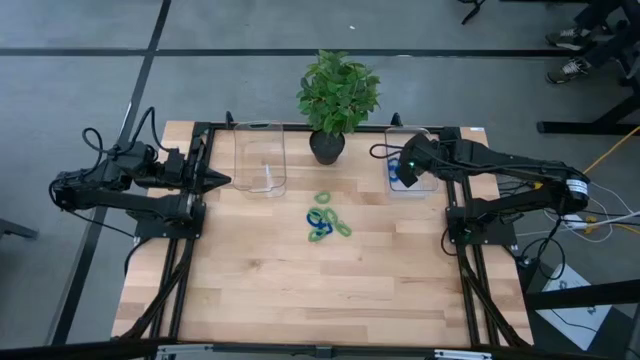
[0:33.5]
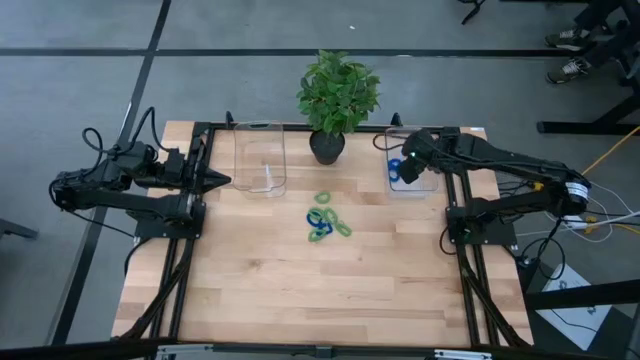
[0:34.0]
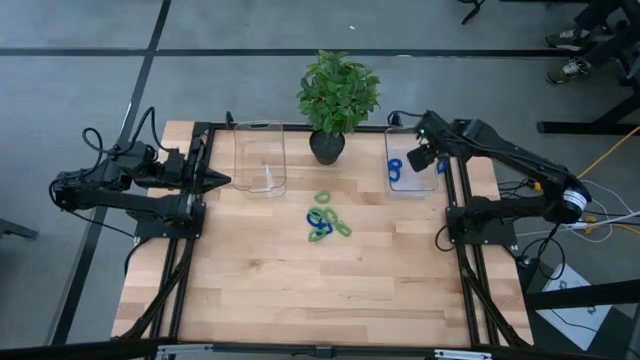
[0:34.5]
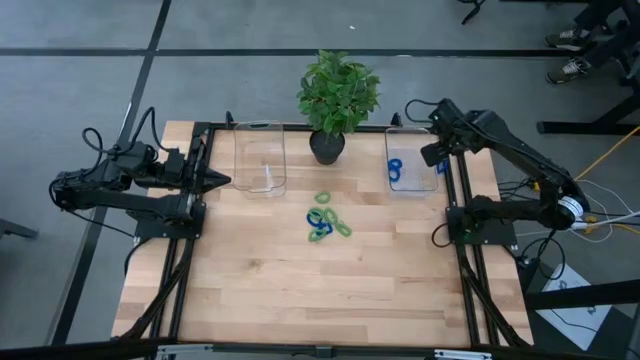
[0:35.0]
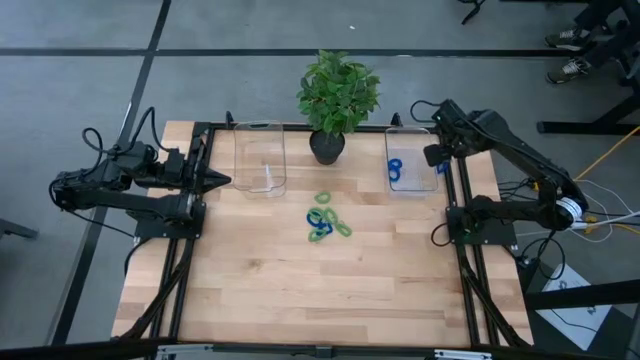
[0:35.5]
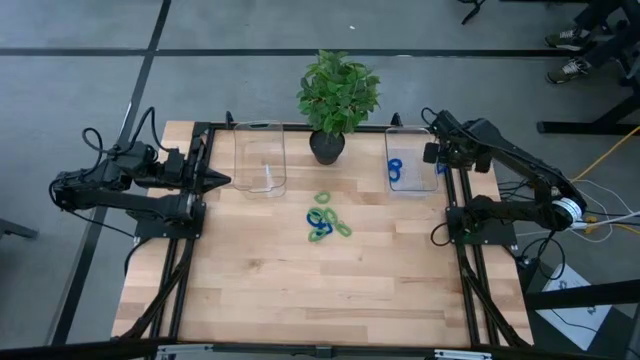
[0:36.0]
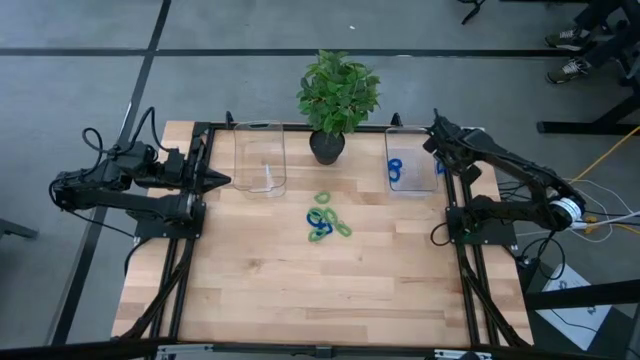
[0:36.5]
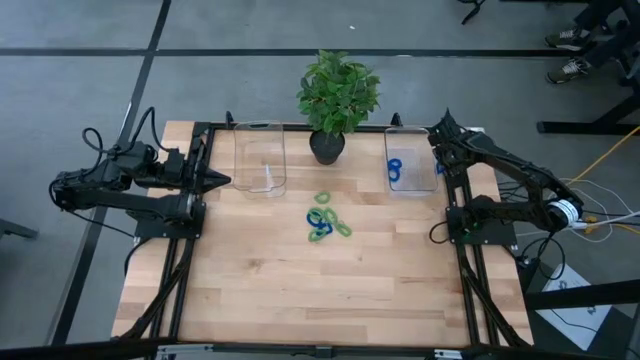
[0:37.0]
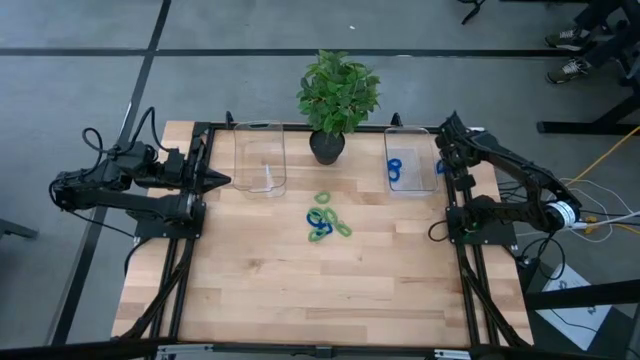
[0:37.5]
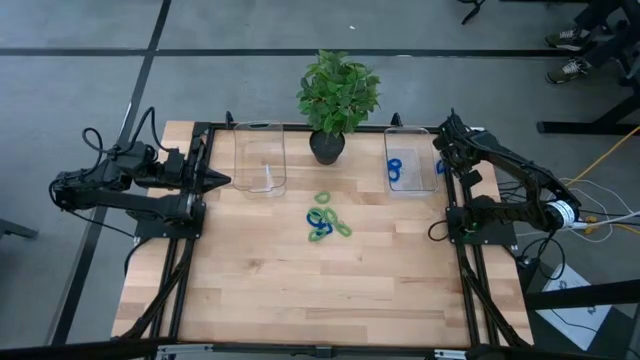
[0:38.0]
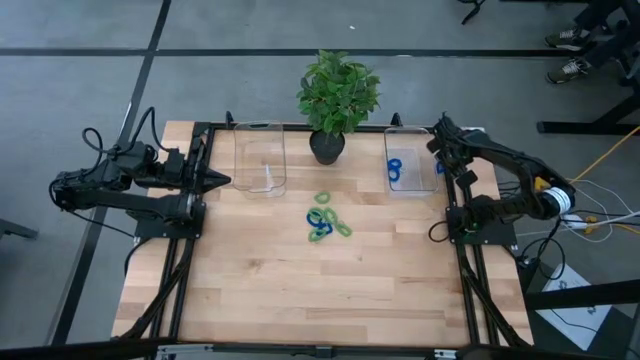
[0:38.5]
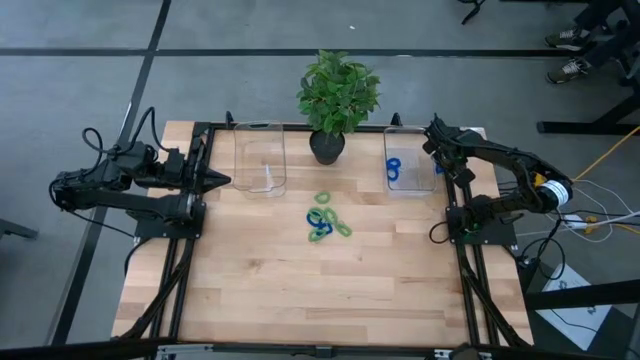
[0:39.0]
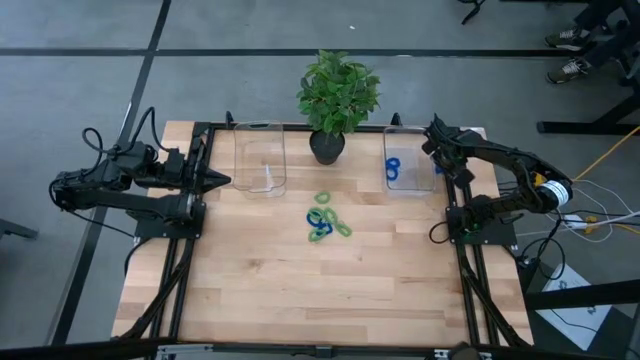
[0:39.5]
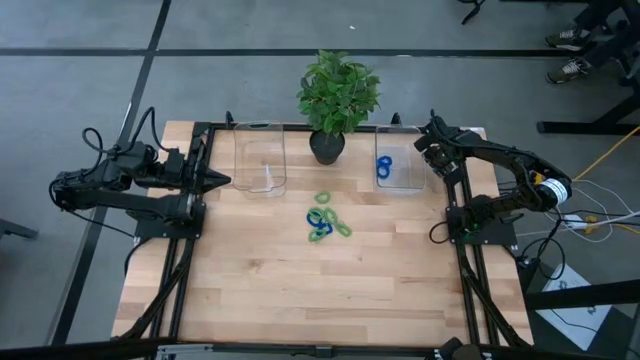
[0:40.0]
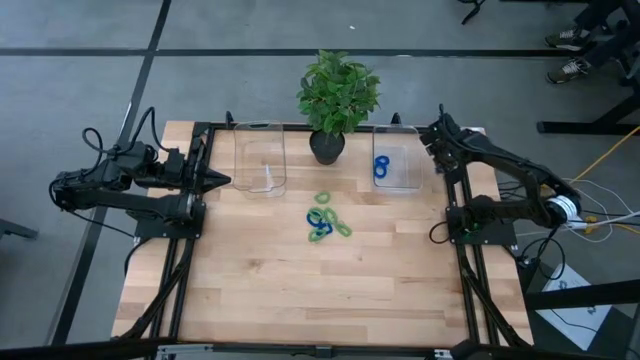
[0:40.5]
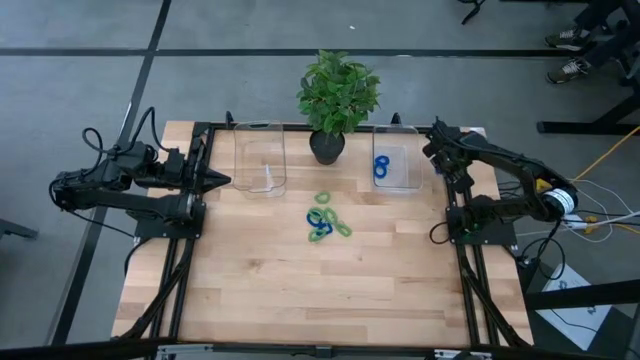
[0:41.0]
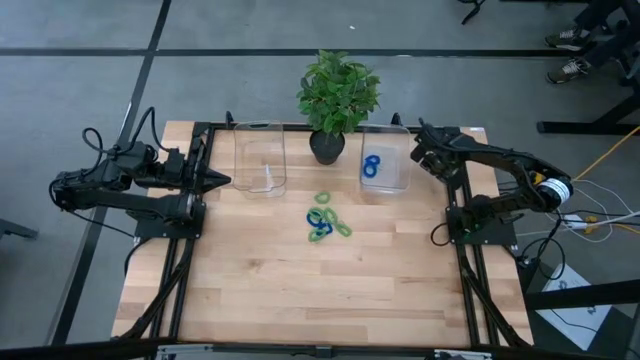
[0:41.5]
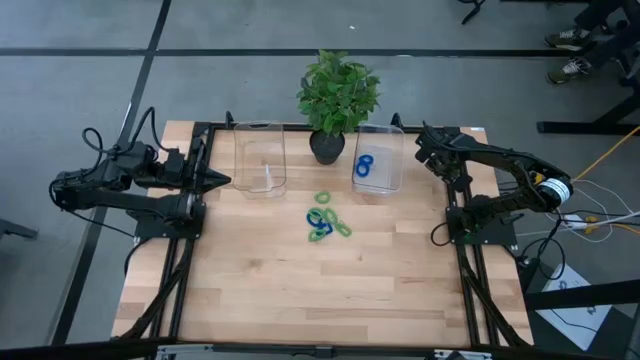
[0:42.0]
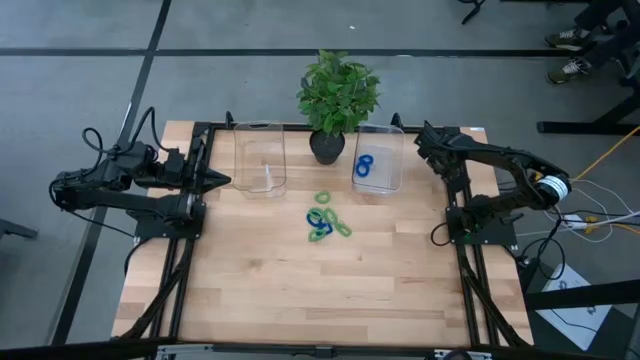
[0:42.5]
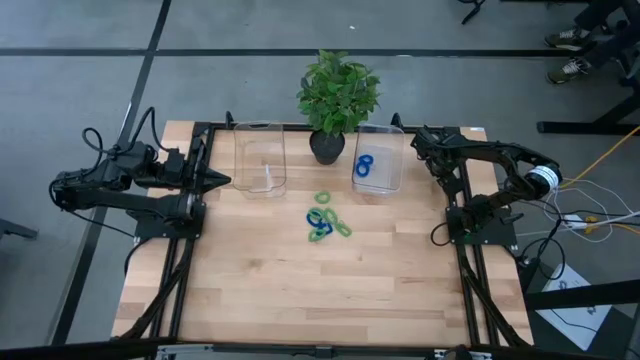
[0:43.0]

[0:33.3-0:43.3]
Task: Sort spring keychains
Put the blue spring keychain into the right transparent bin

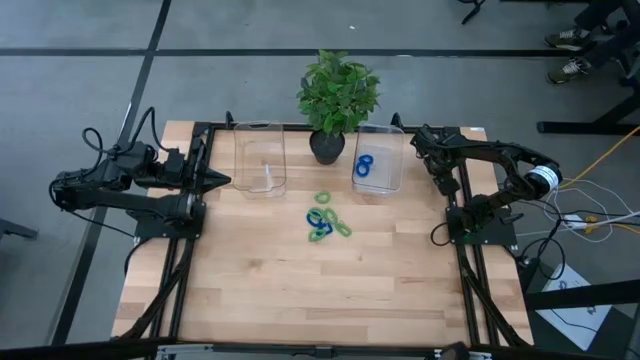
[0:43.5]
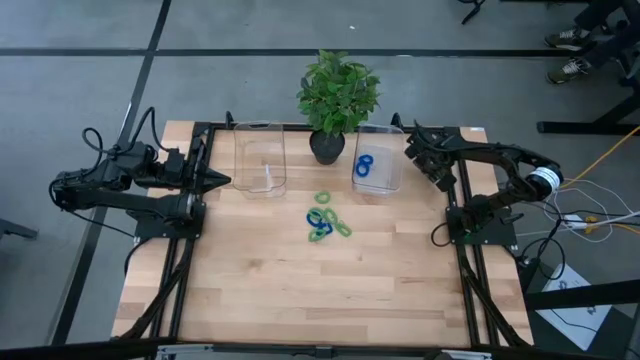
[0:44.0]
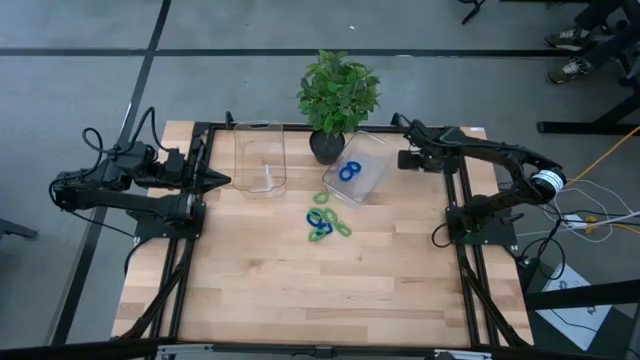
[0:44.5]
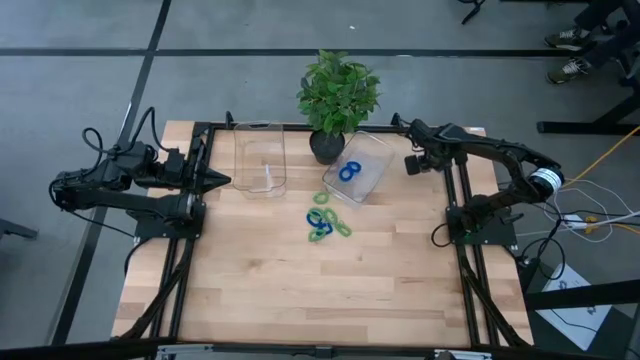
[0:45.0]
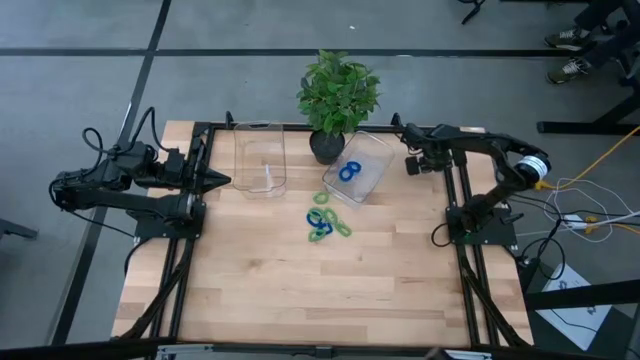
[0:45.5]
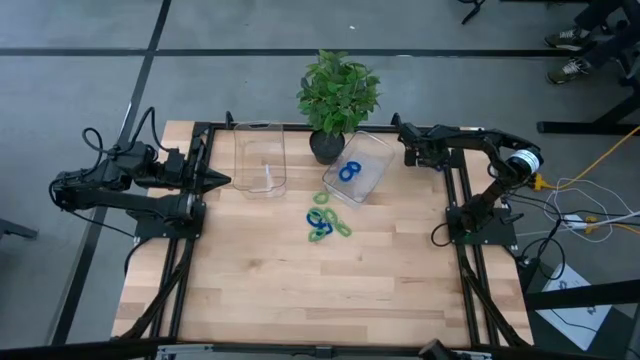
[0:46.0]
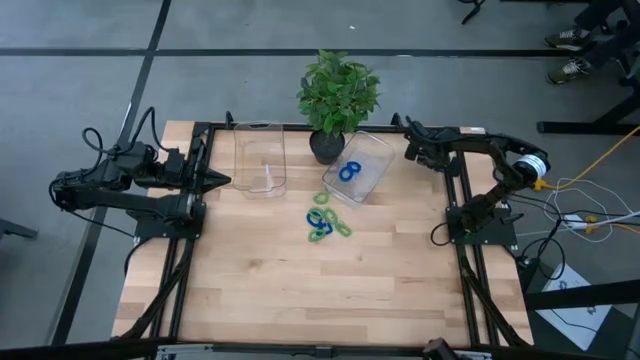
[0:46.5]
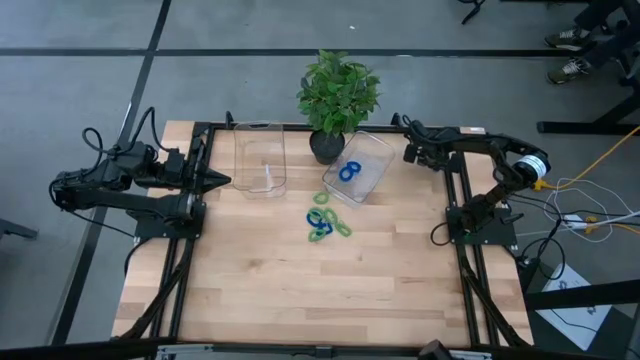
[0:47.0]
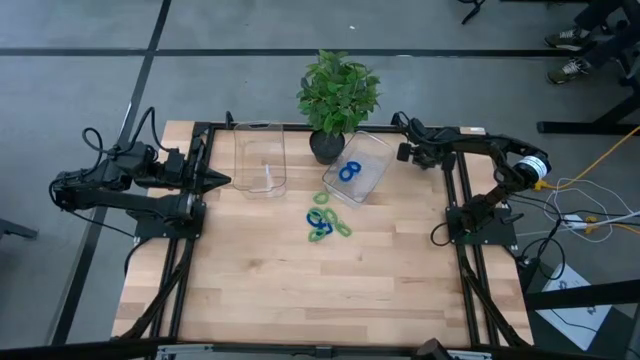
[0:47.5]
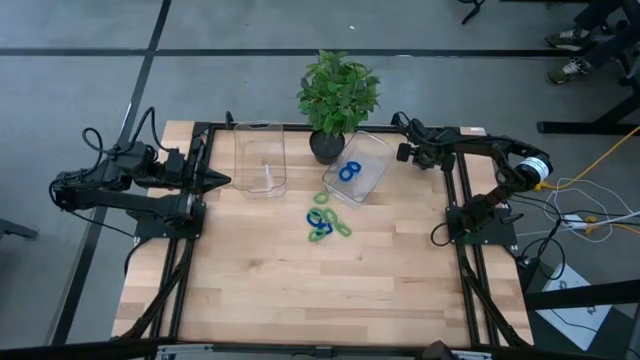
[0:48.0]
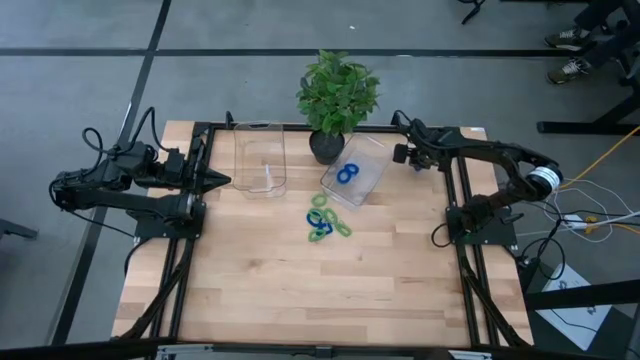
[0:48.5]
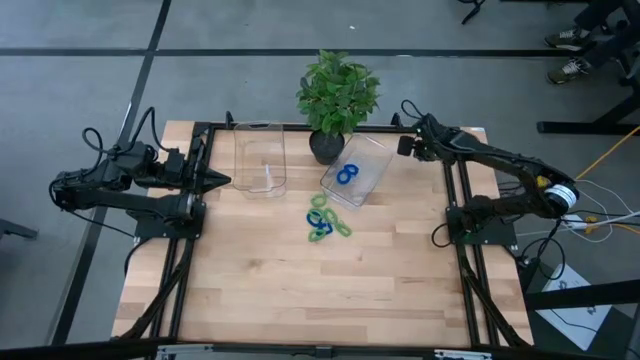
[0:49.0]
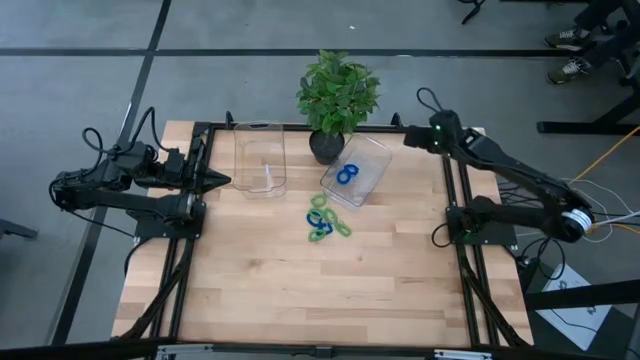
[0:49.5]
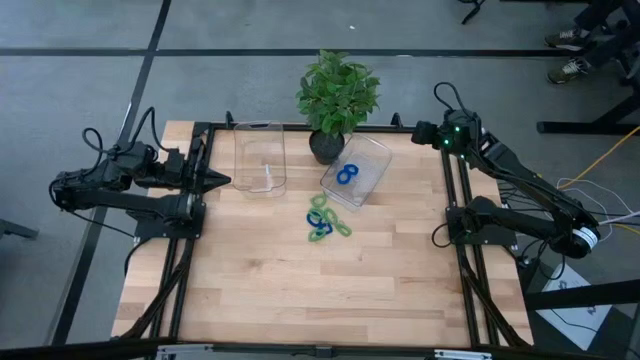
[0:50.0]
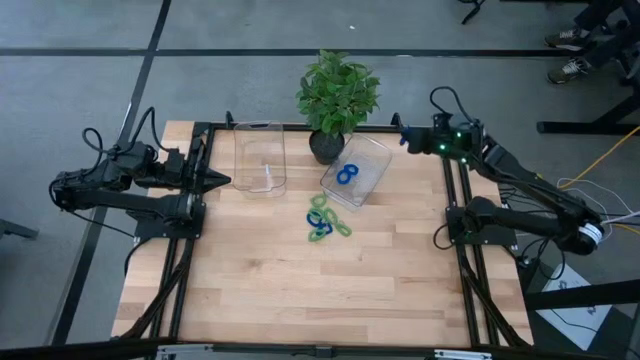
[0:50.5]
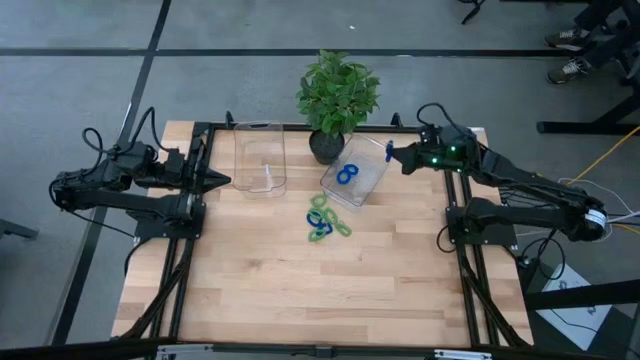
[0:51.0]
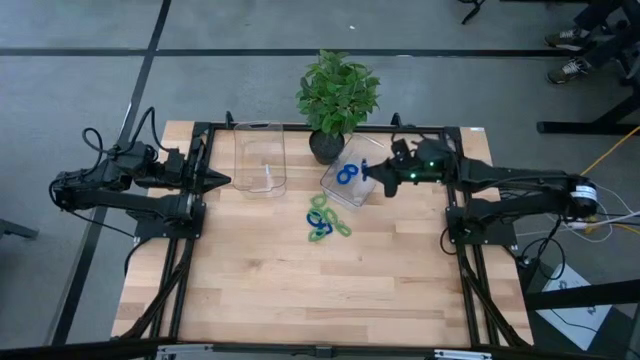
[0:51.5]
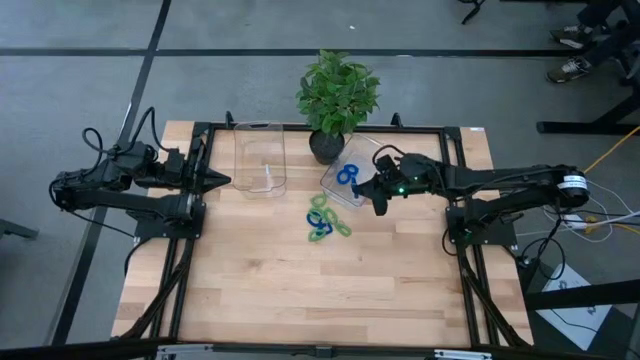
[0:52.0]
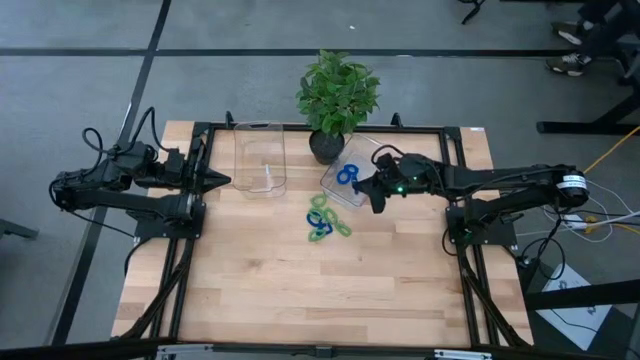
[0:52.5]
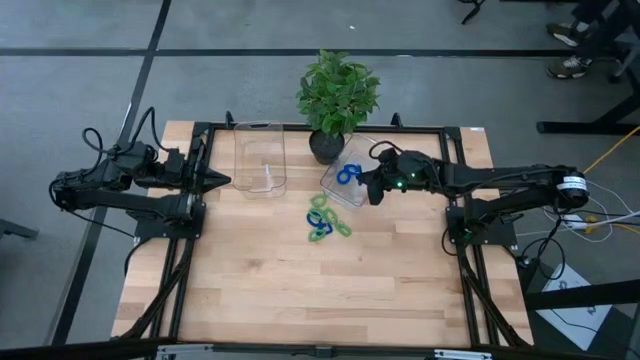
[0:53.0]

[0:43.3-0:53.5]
Put the blue spring keychain into the right transparent bin

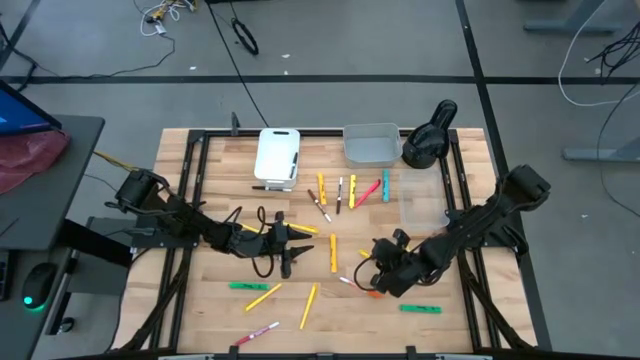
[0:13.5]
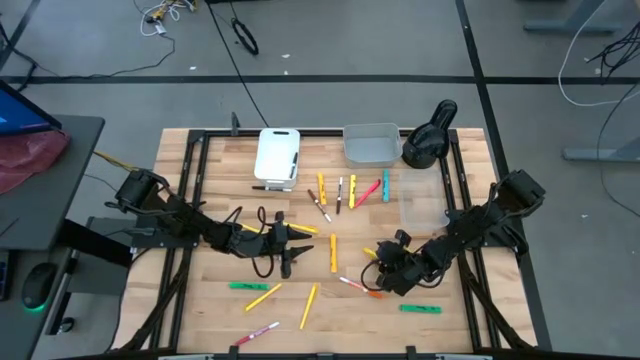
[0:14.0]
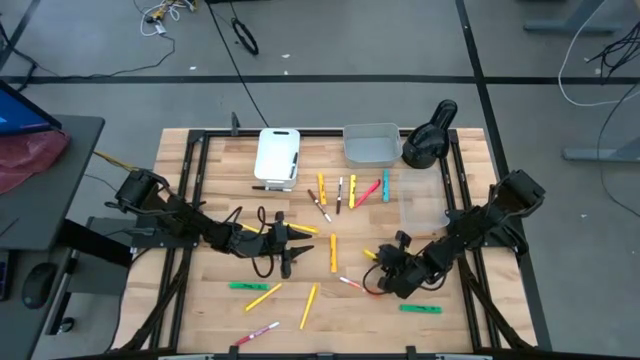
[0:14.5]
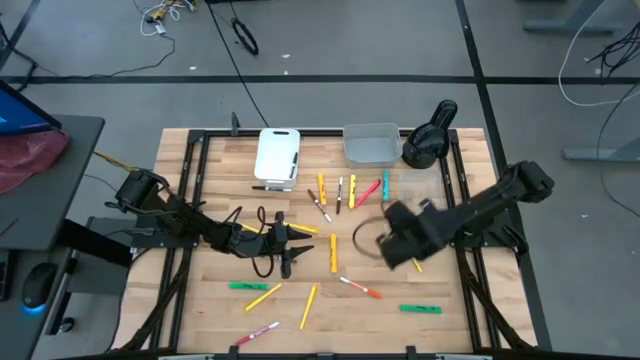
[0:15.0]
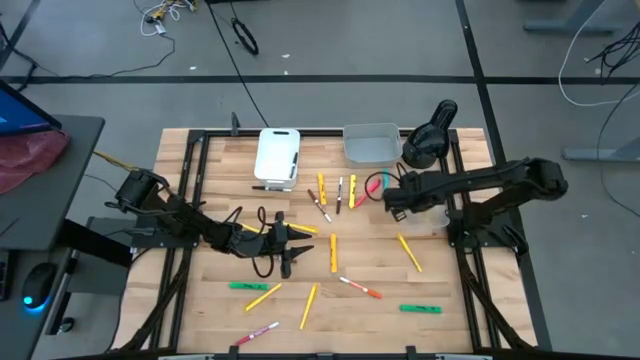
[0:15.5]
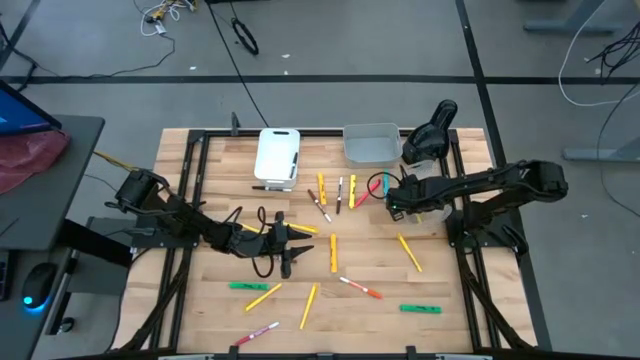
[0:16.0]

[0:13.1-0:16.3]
Task: Pick & Place Markers
Put the yellow pen into the transparent bin
